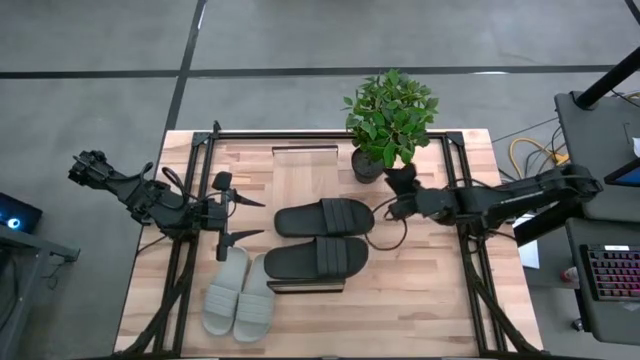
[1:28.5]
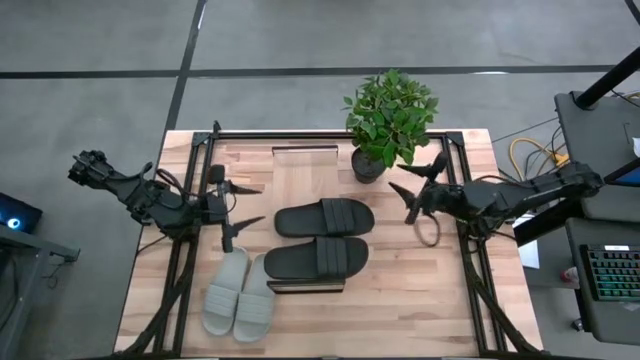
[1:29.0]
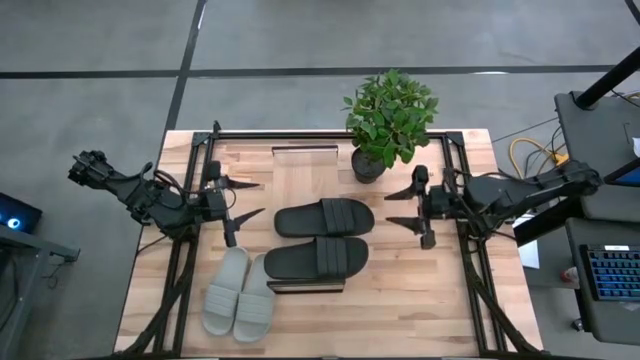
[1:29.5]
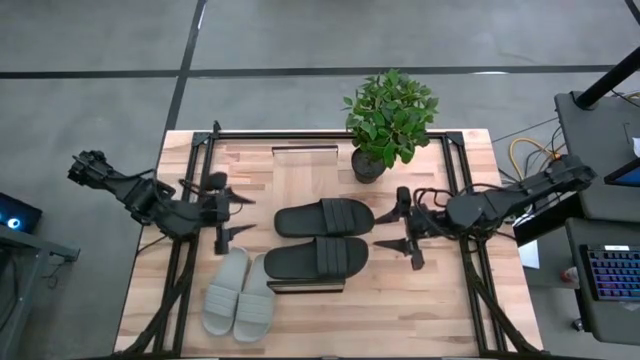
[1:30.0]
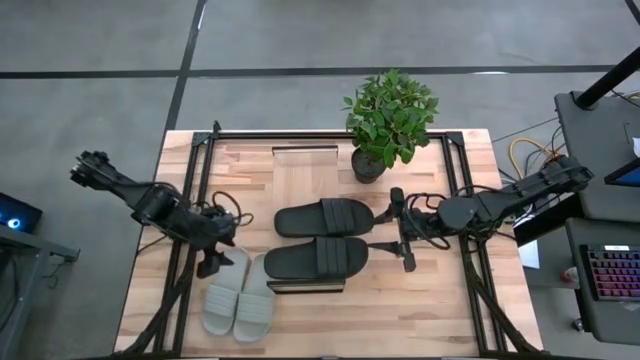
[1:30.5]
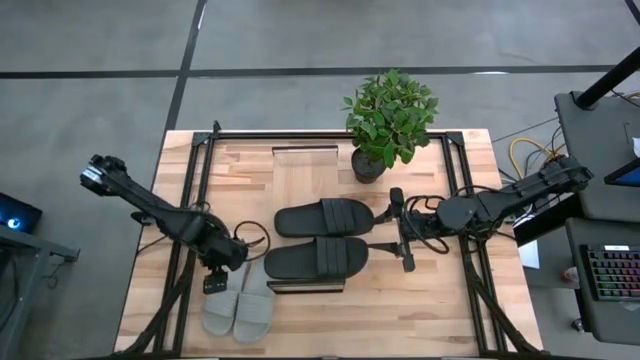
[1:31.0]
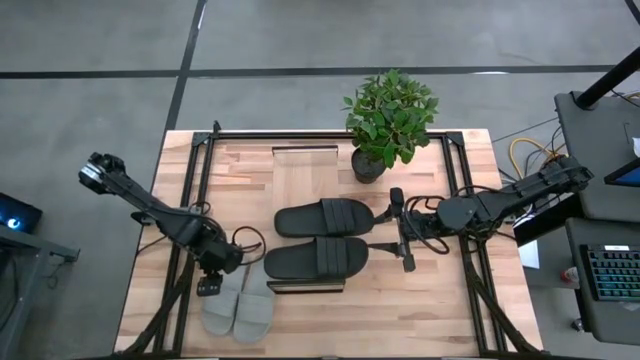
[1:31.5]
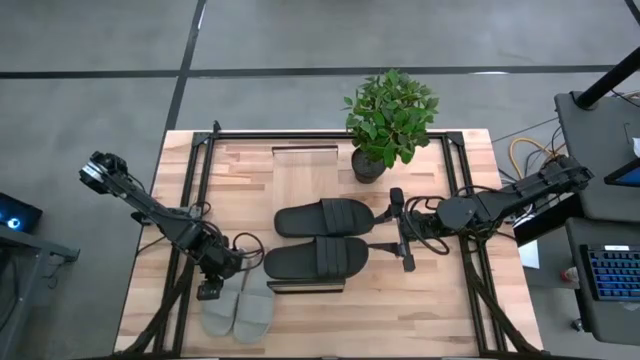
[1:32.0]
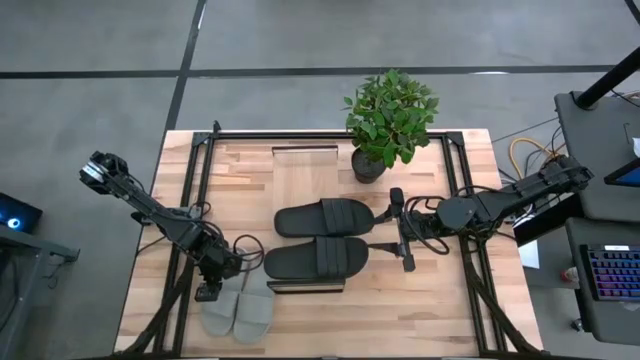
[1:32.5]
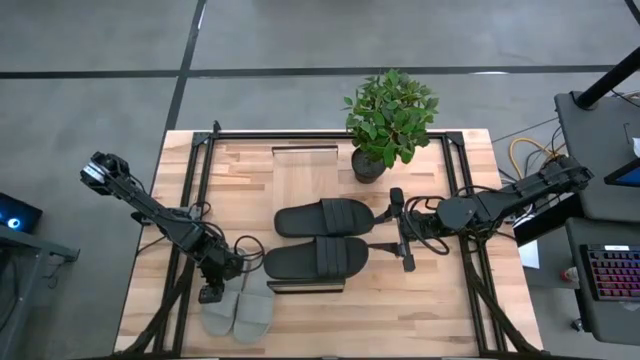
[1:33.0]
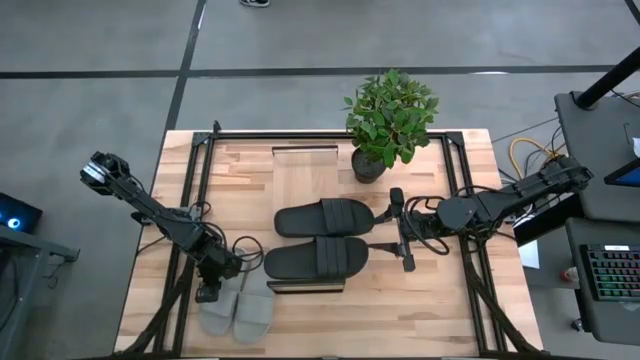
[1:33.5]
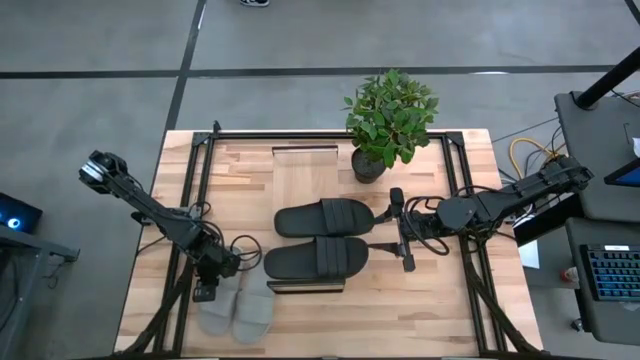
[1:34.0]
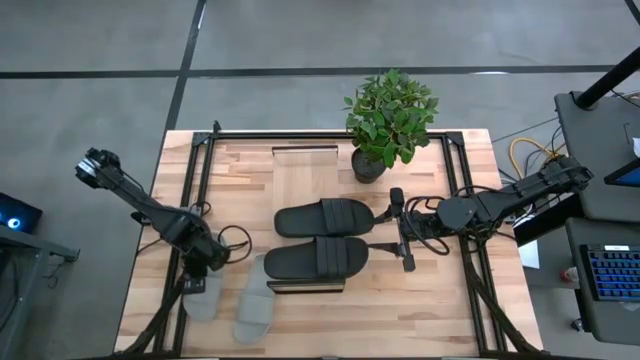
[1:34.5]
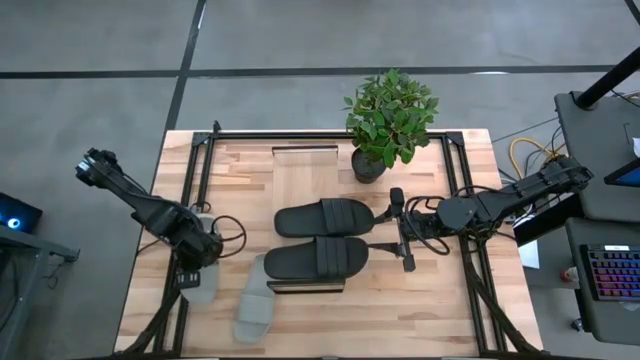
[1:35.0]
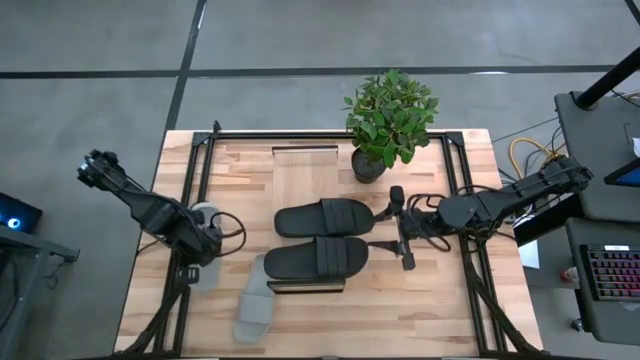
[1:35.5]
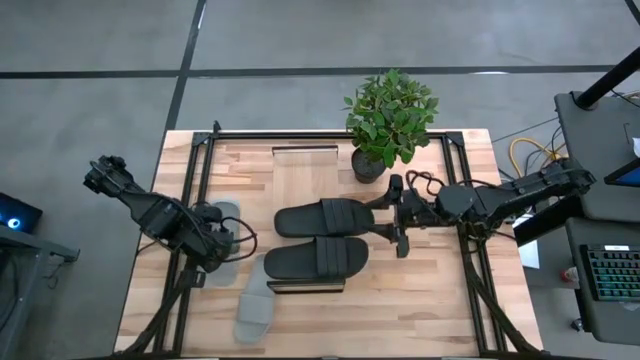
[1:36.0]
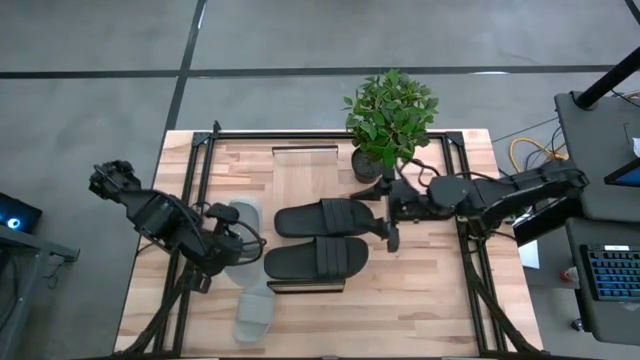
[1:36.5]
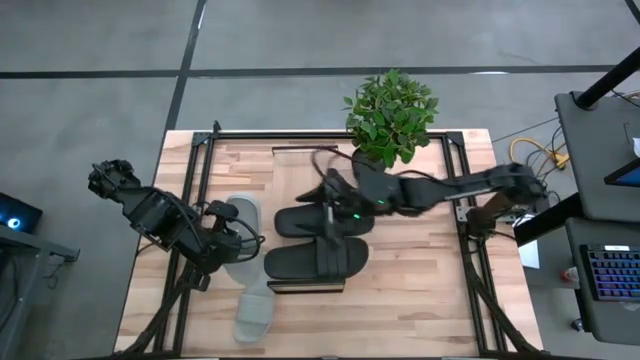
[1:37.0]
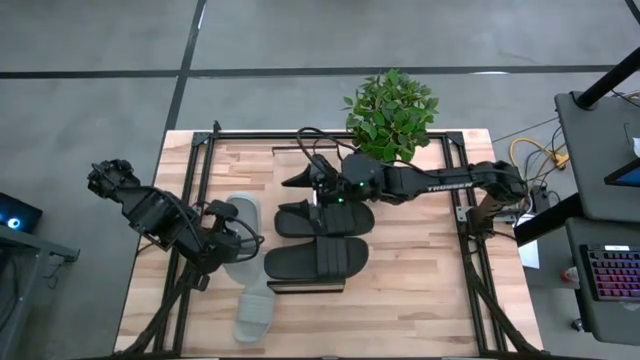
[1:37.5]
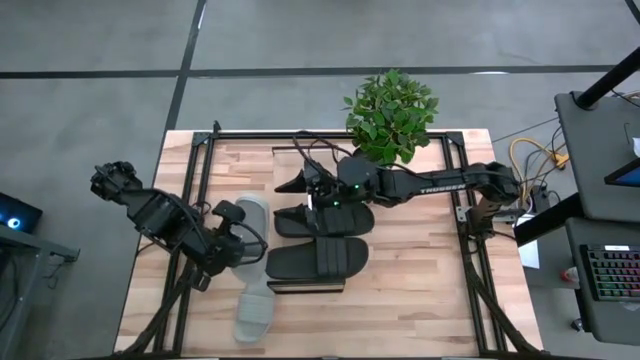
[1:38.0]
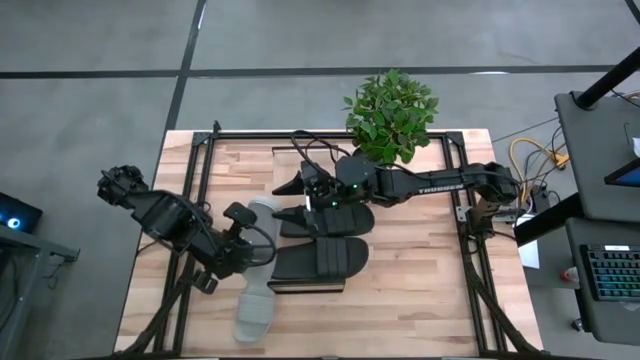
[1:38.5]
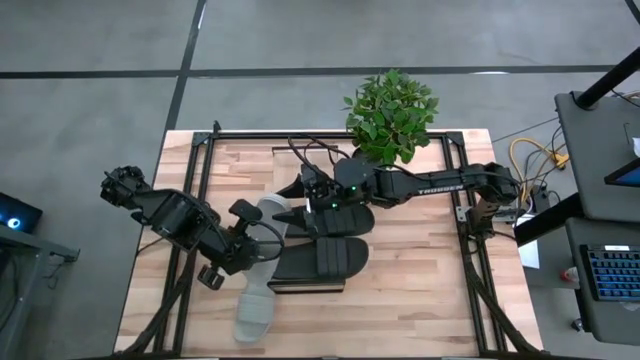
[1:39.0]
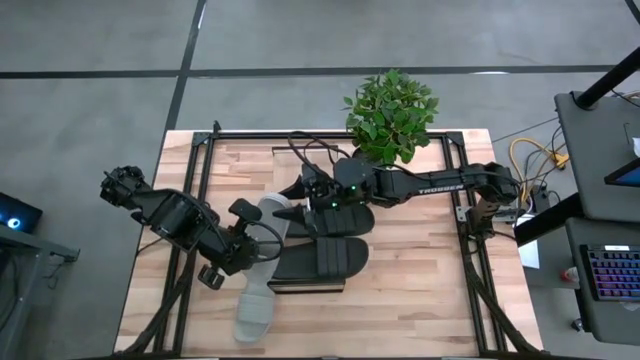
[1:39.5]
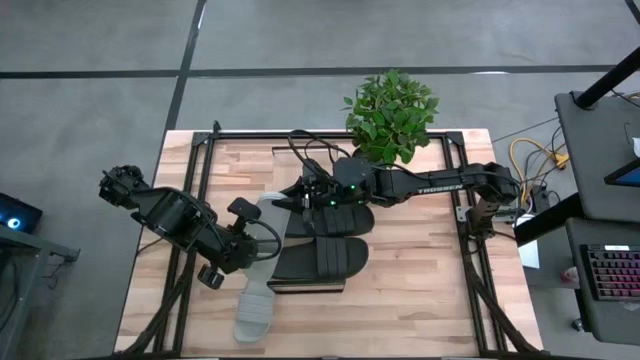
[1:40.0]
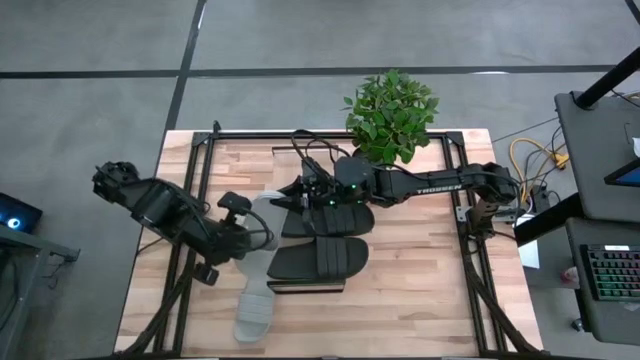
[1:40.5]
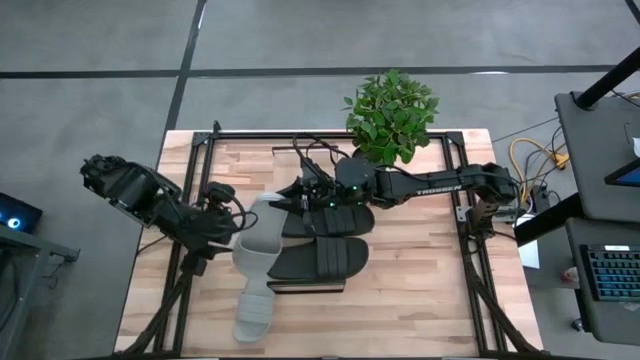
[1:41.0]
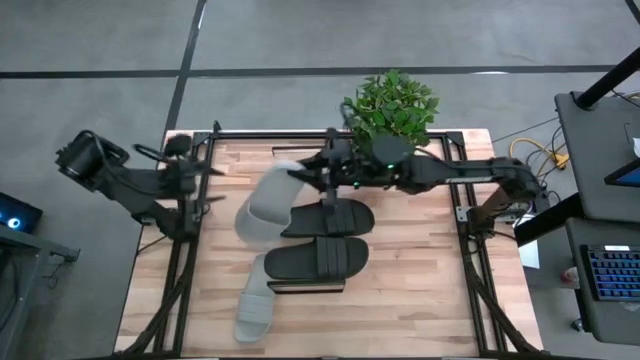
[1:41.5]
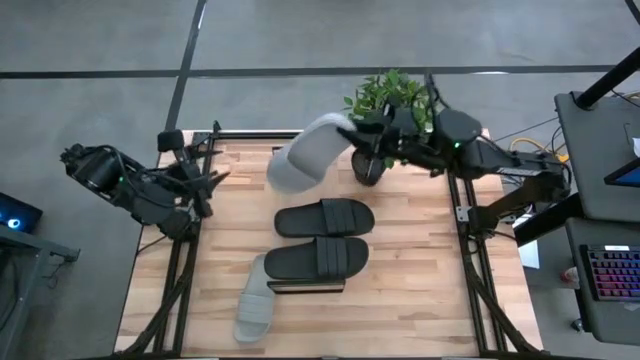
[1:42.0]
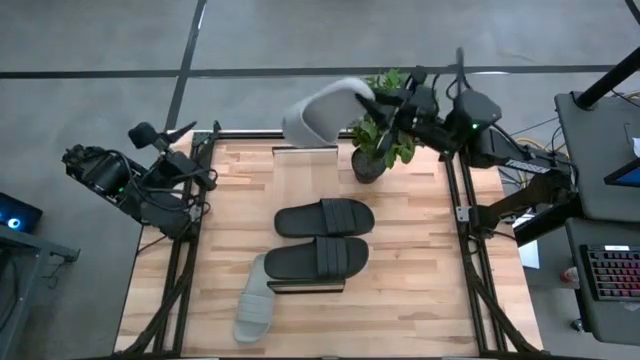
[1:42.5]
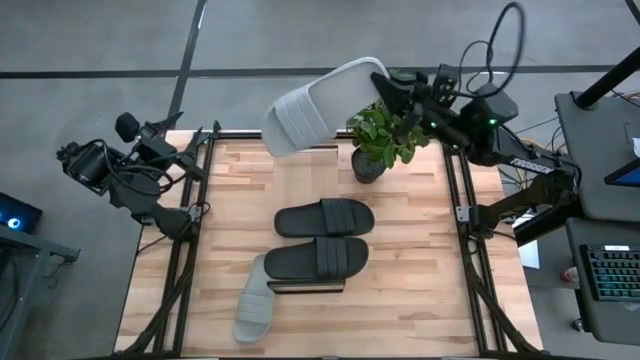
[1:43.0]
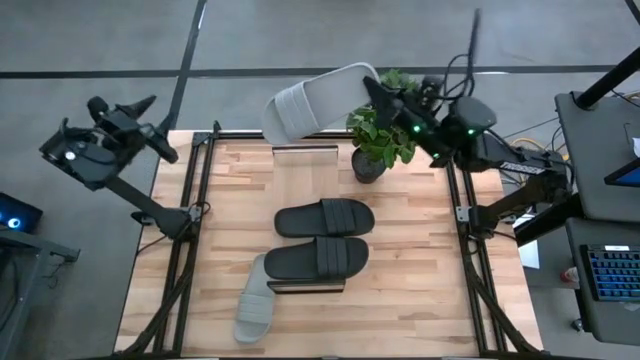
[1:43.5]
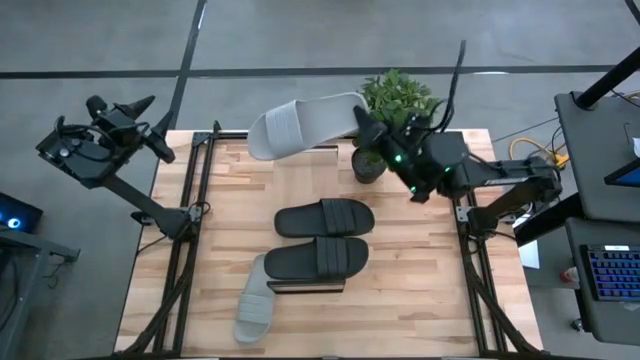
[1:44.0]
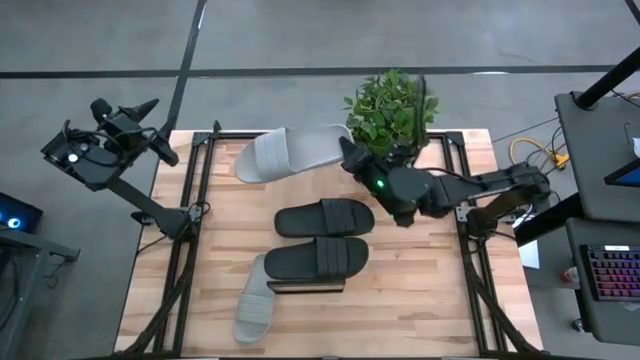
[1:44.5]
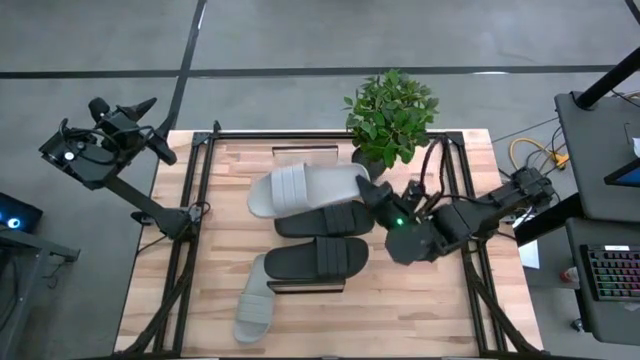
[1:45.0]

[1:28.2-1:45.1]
Task: Pick and place slides into the shelf
Put the left gray slipper on the shelf

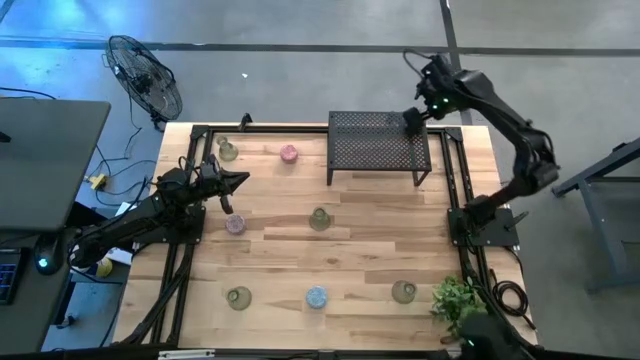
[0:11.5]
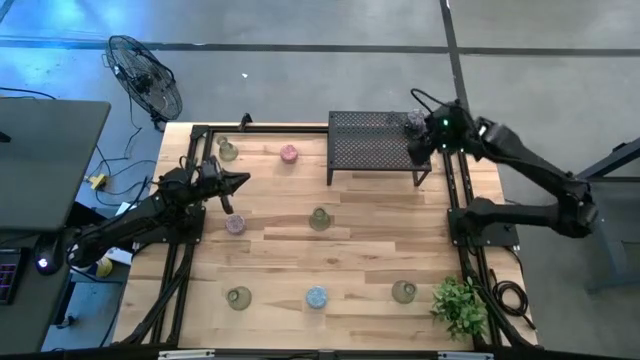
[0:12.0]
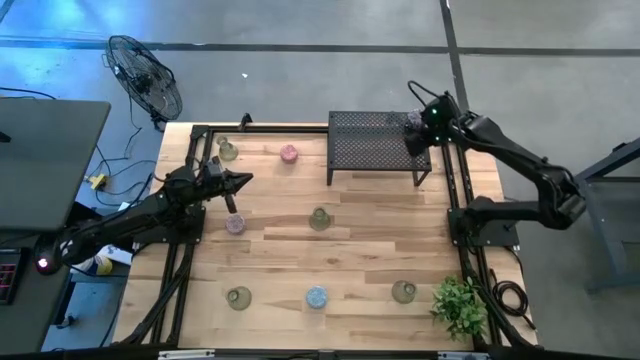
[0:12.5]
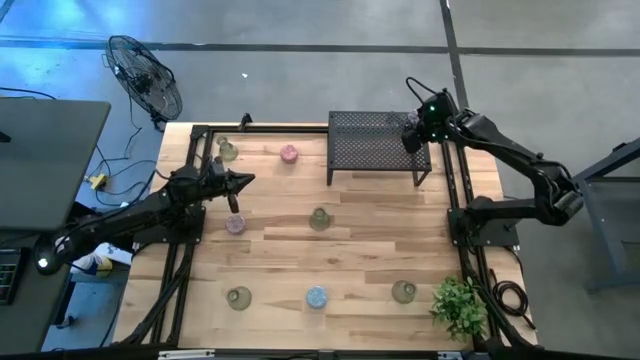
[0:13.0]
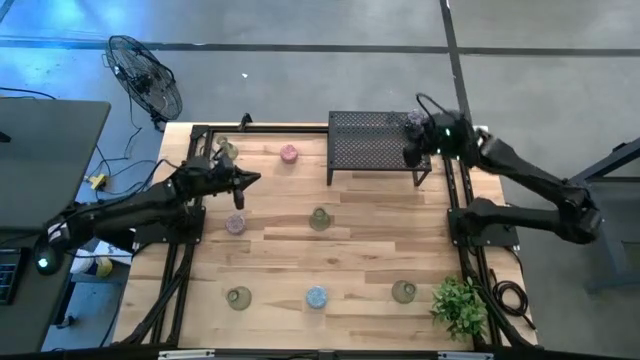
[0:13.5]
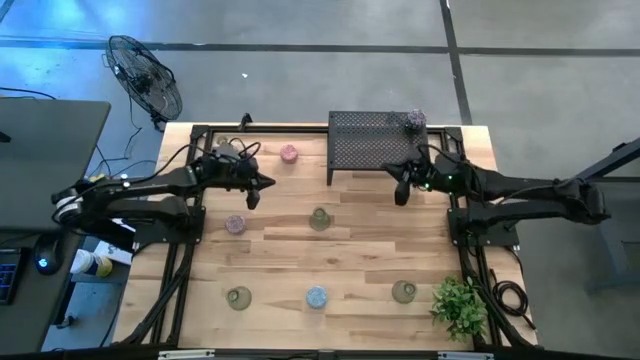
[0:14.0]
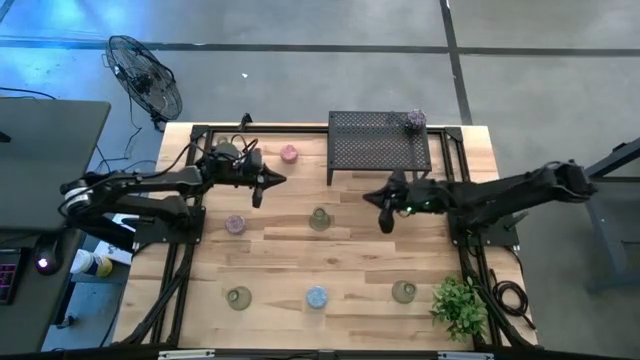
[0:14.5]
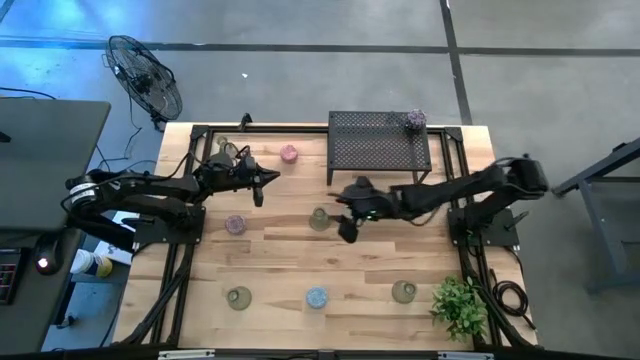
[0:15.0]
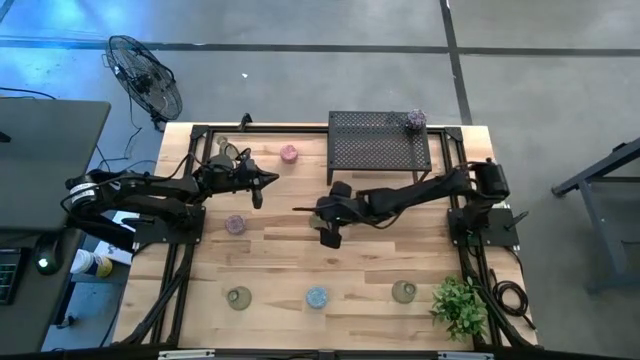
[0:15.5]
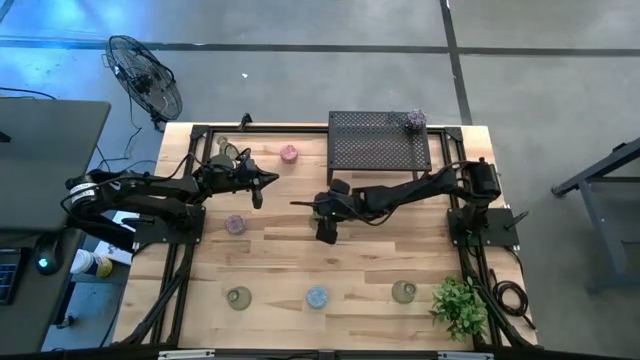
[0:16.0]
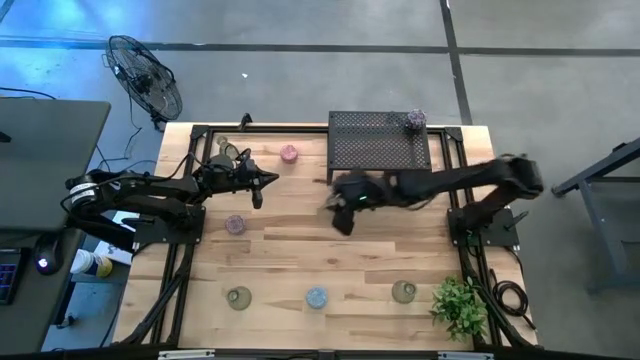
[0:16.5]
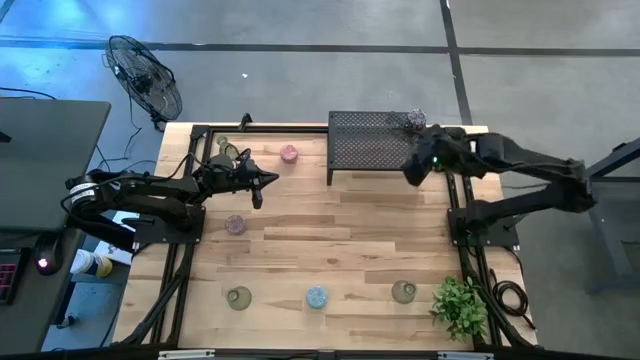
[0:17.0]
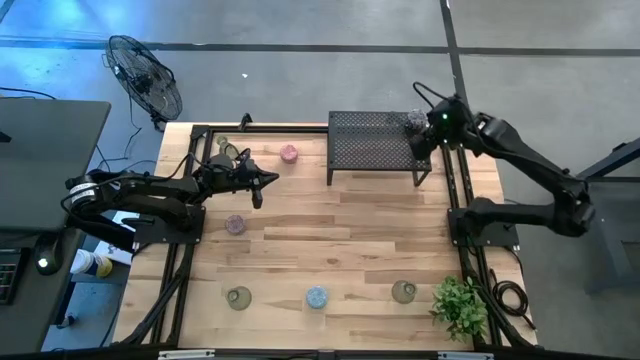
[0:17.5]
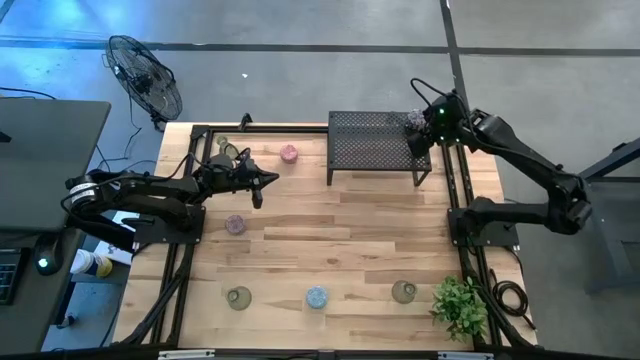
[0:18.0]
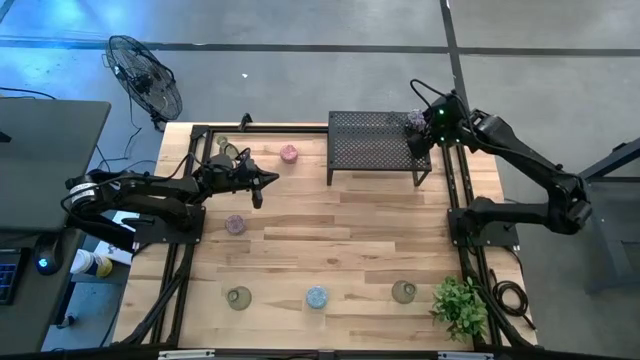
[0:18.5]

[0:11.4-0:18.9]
Task: Pick & Place candle stick holders
Put the green glass candle holder on the shelf
